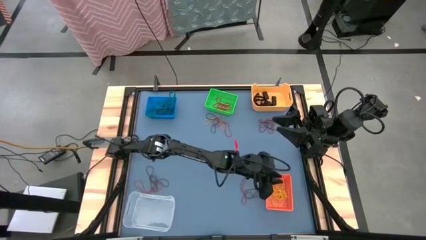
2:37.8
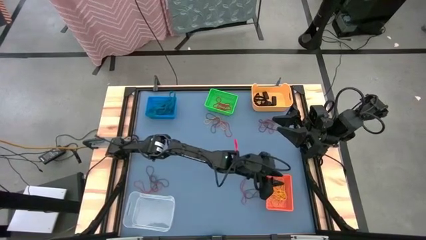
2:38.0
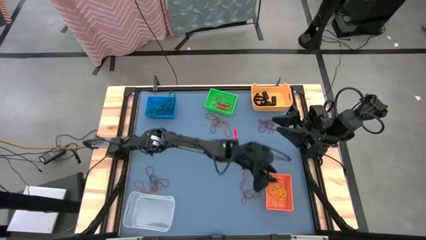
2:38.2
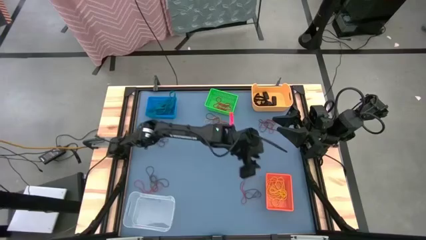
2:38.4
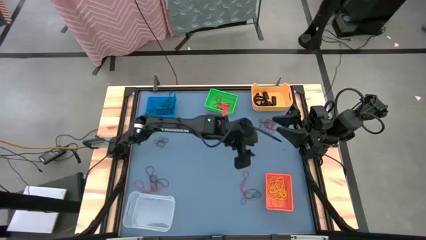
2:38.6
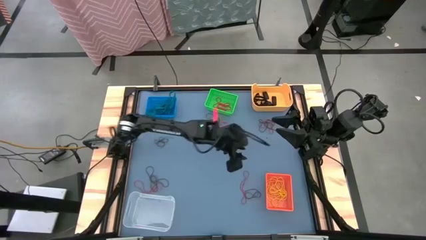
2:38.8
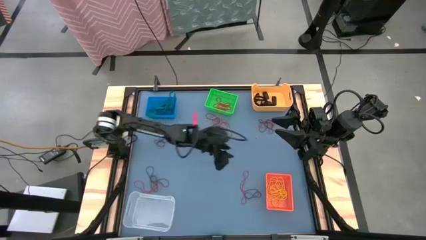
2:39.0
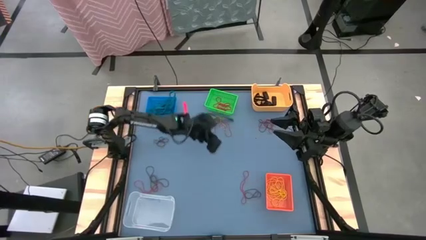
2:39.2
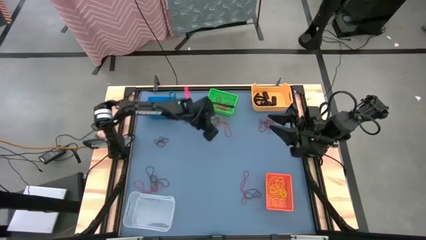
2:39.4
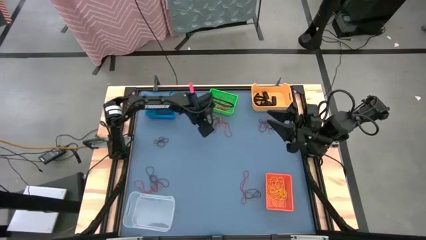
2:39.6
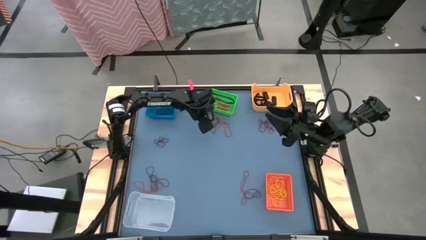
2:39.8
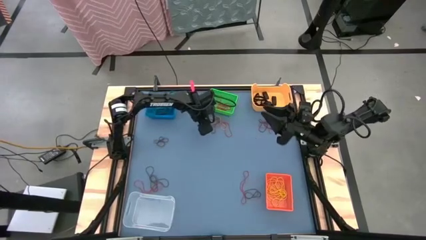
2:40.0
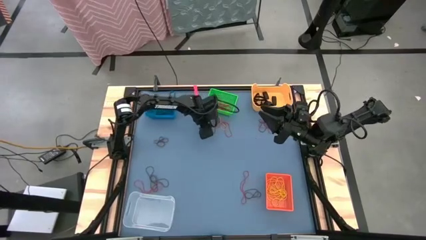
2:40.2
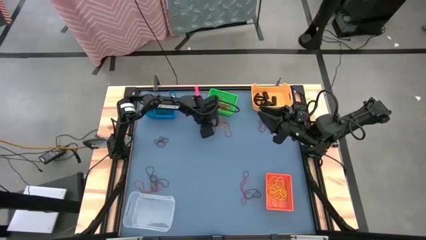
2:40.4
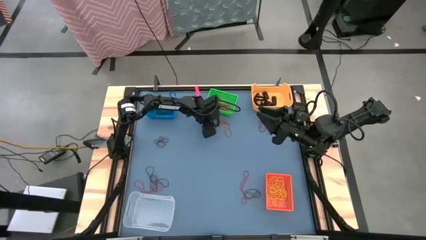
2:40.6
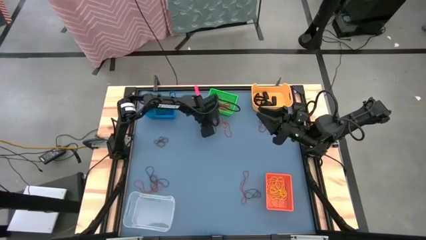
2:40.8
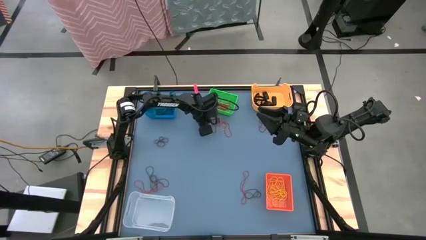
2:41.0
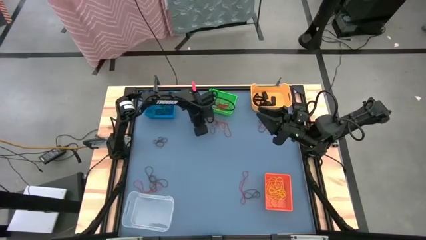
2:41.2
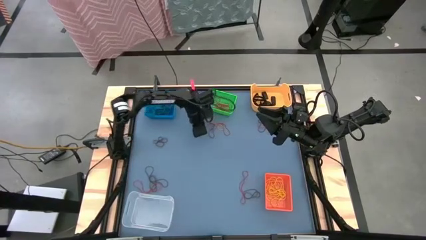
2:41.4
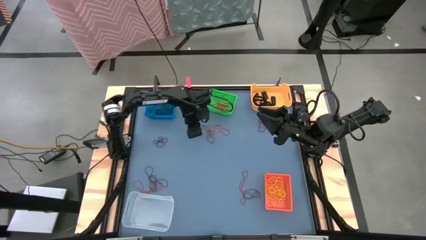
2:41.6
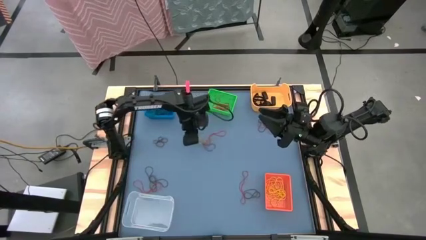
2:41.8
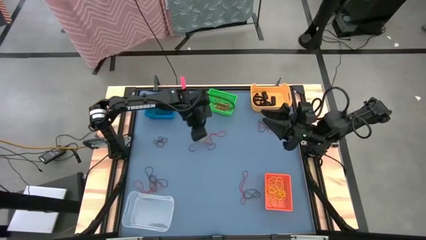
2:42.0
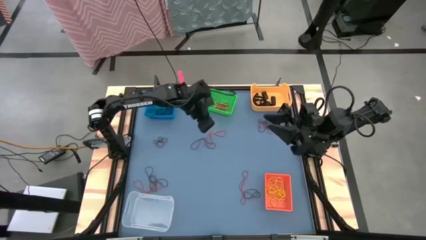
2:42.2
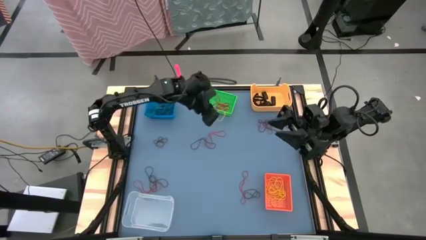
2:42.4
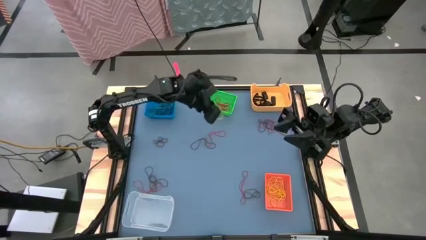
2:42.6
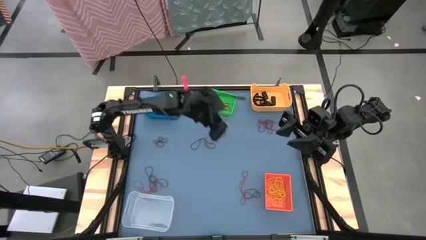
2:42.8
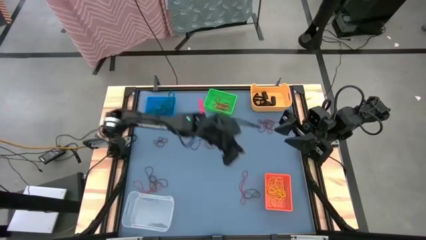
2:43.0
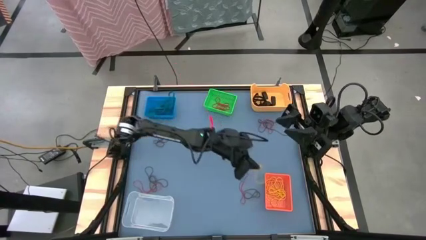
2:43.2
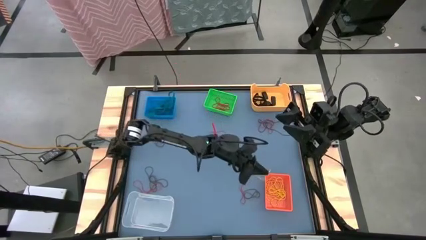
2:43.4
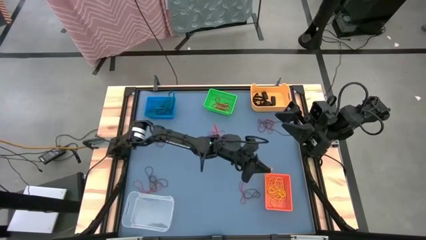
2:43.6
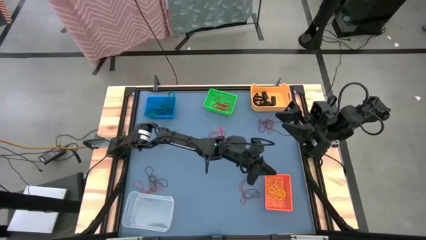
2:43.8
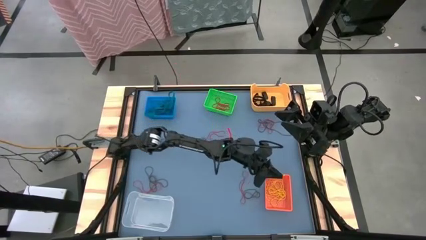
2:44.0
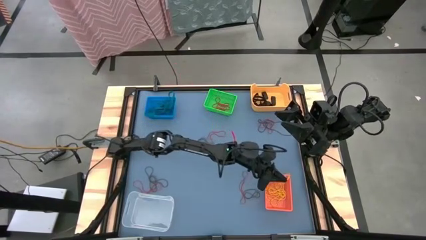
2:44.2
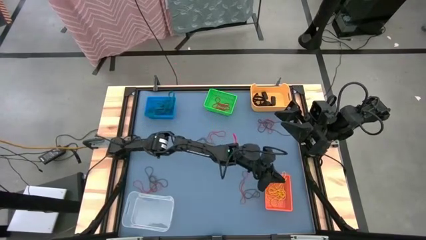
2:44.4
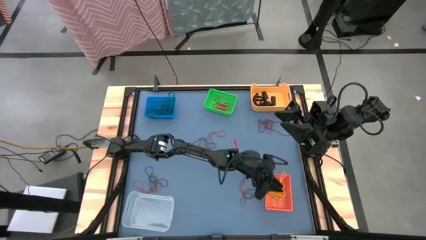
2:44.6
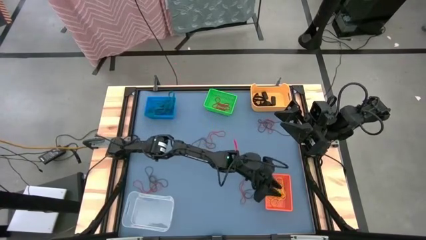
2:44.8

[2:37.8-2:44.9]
Task: Sort rubber bands into baskets
Put the yellow rubber band into the orange bin

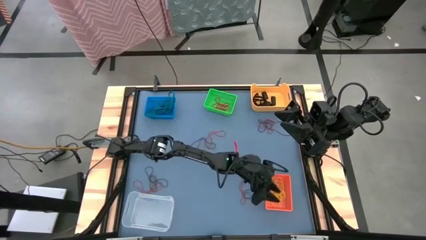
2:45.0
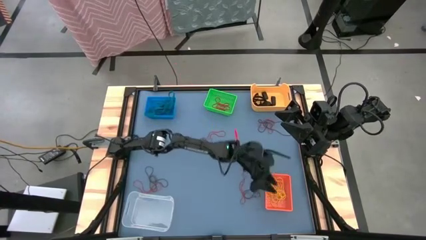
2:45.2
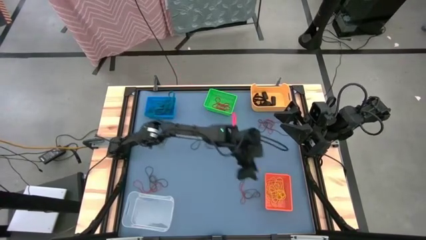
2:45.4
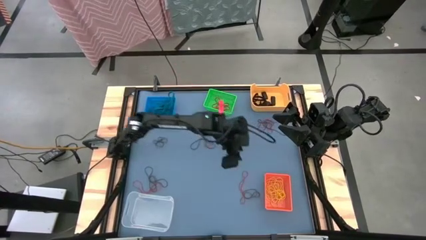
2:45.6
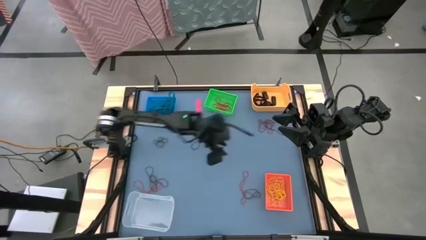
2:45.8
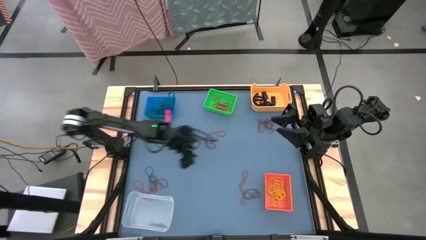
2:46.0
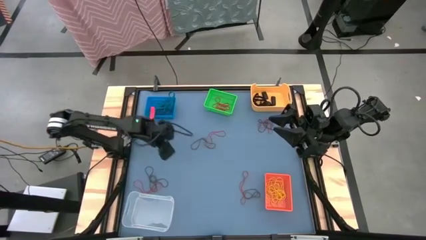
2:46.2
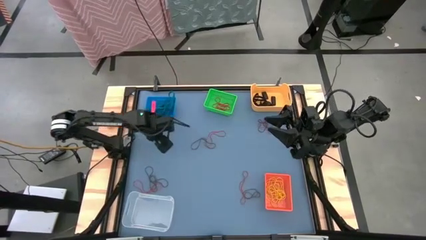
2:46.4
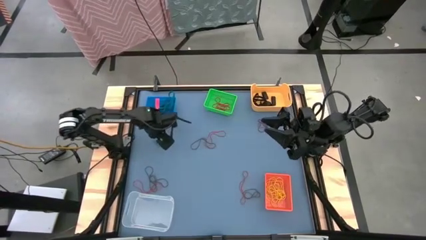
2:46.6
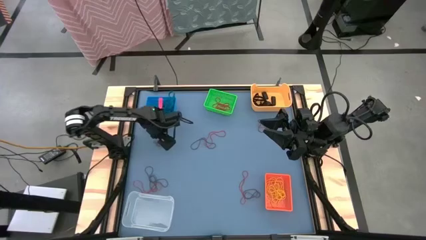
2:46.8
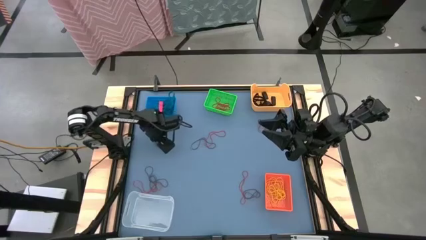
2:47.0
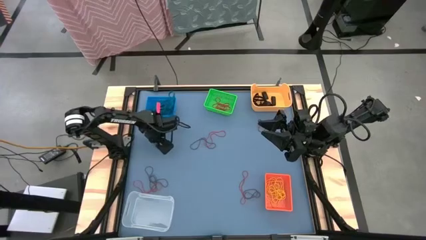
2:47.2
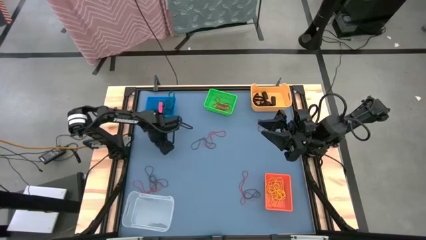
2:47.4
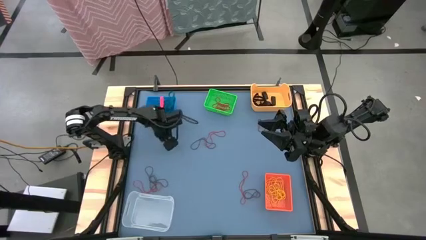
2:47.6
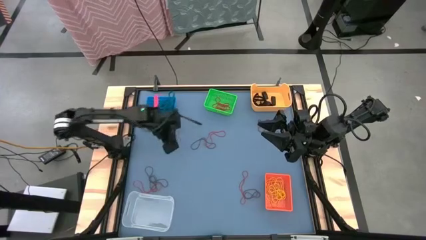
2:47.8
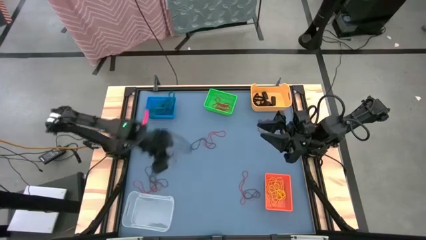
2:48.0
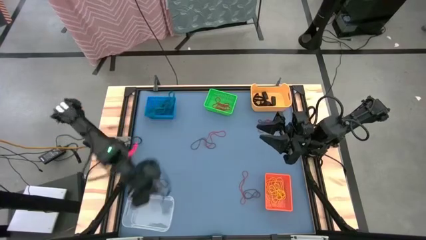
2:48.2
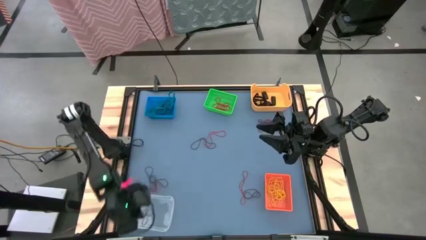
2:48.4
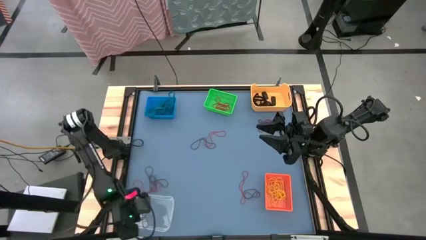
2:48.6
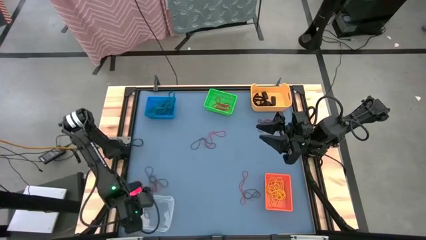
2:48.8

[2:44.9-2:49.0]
Put the brown rubber band into the transparent bin

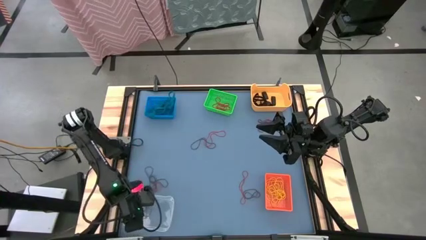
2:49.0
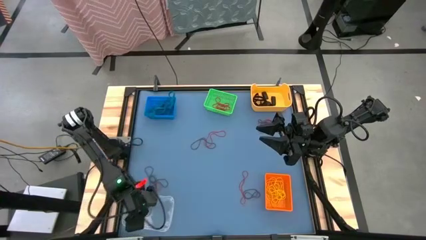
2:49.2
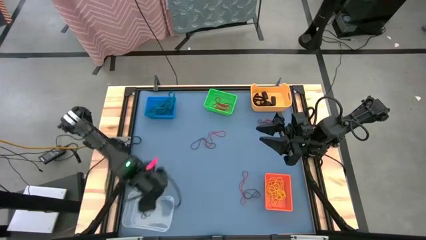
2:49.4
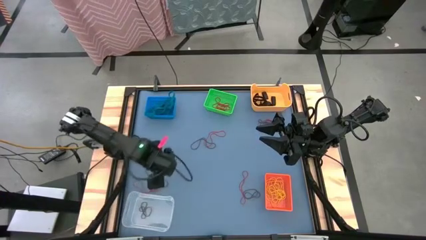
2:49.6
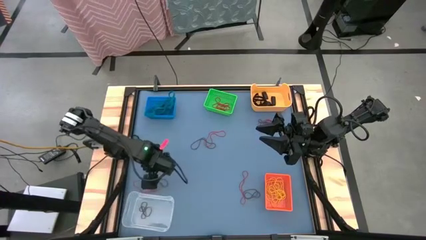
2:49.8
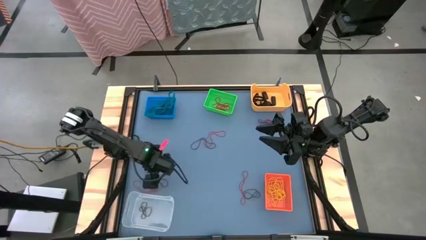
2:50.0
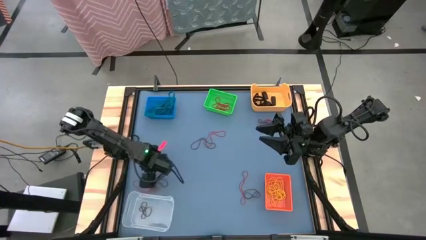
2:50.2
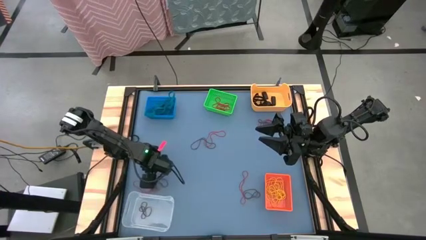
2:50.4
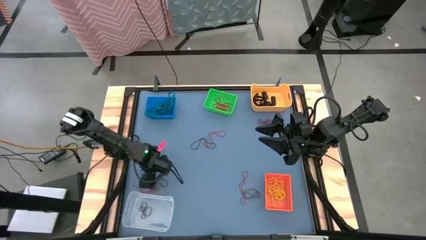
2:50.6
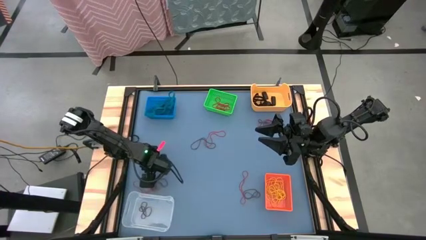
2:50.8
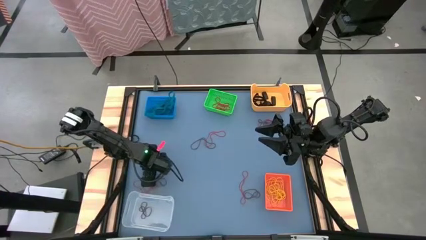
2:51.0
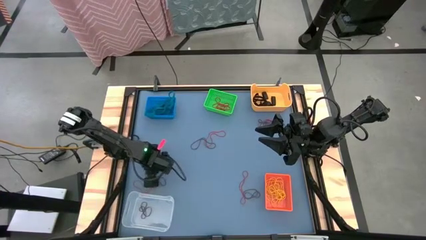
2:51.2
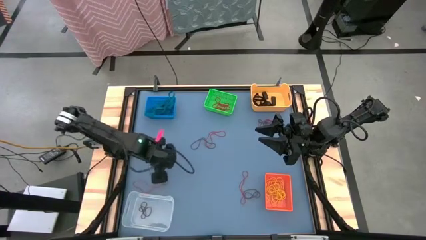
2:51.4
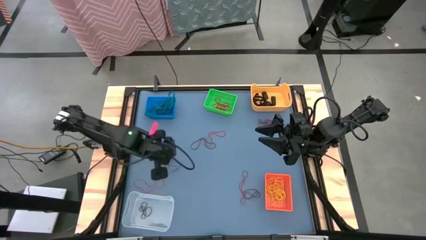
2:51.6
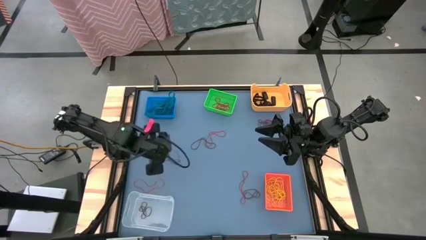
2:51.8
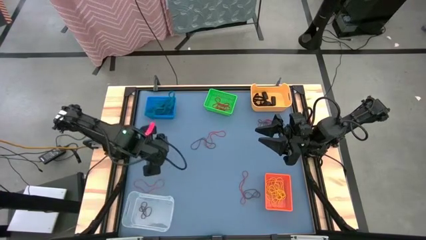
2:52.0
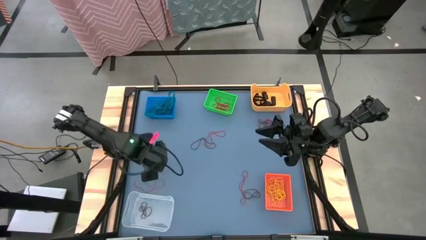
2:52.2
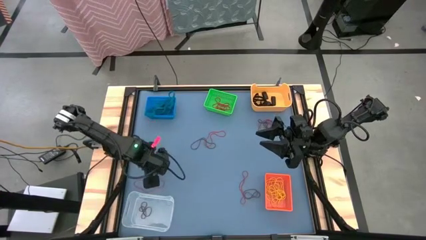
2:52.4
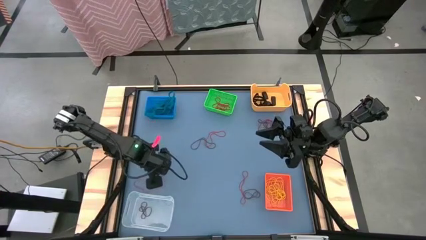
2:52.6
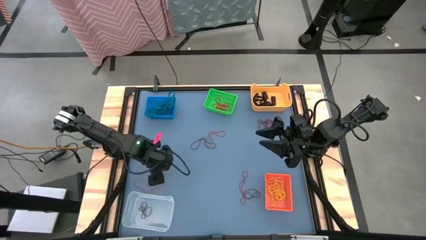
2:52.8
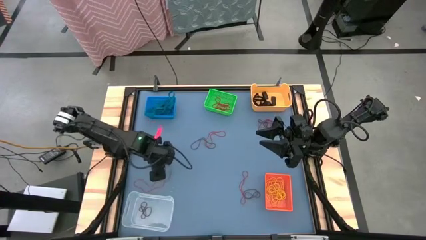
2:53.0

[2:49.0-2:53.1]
Put the brown rubber band into the transparent bin

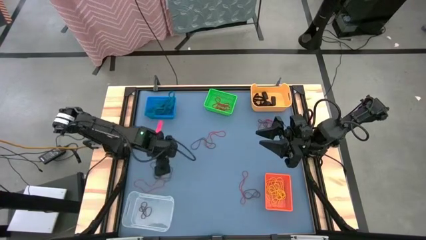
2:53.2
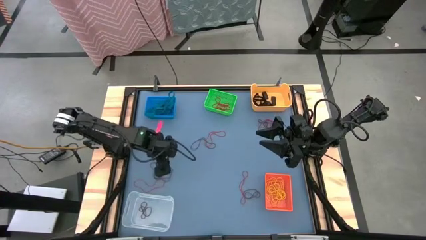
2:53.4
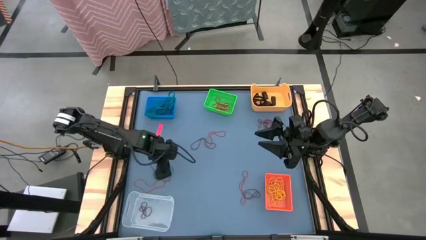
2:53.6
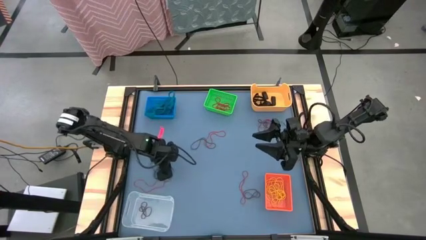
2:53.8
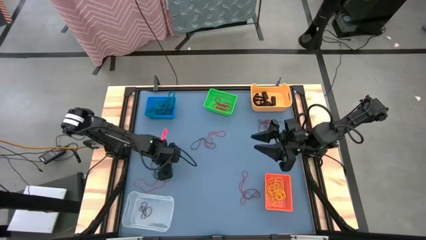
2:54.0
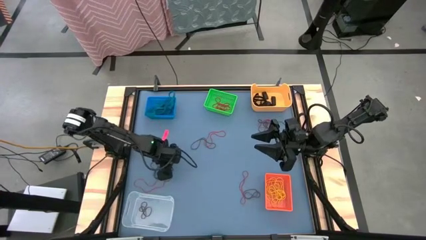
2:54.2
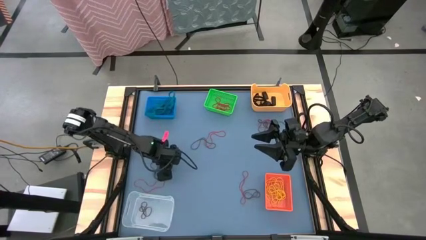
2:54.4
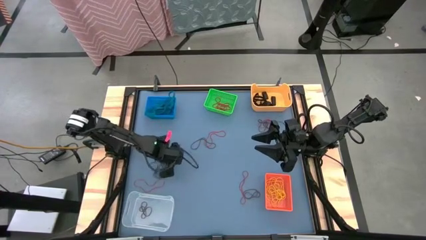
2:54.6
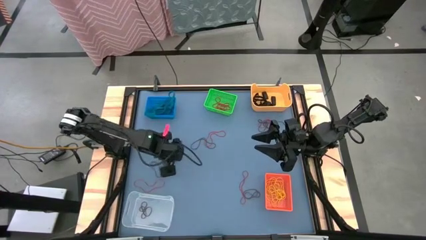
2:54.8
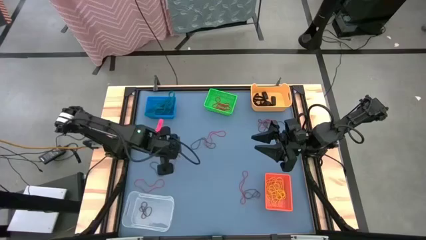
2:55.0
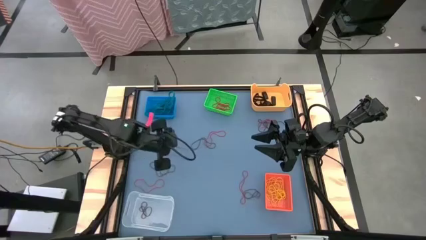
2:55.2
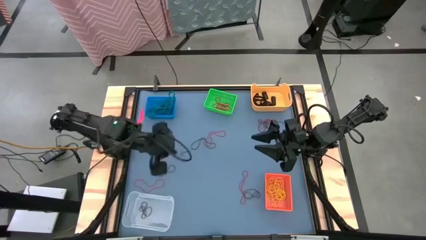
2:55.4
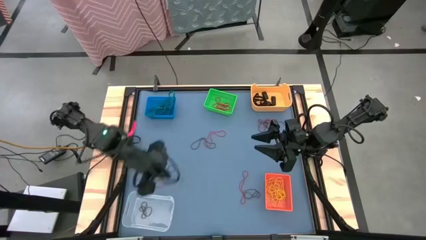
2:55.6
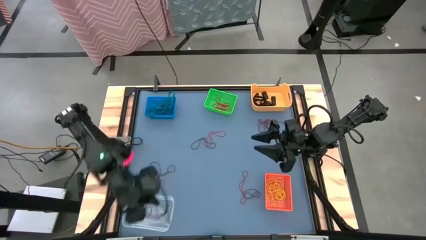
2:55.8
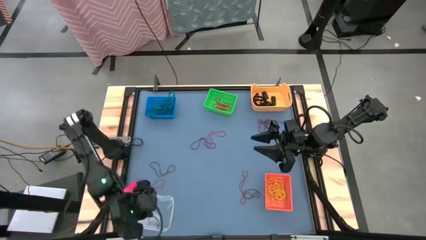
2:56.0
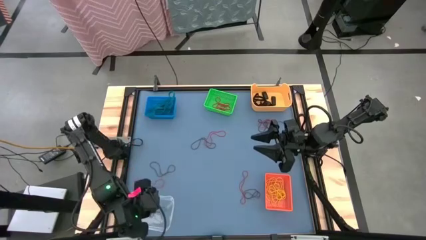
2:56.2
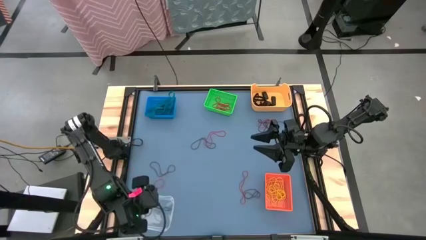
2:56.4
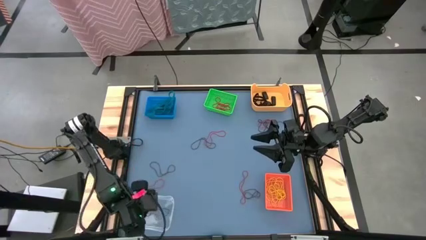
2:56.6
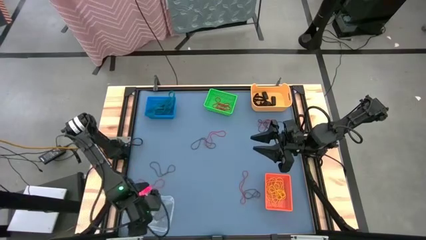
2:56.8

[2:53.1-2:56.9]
Put the brown rubber band into the transparent bin
